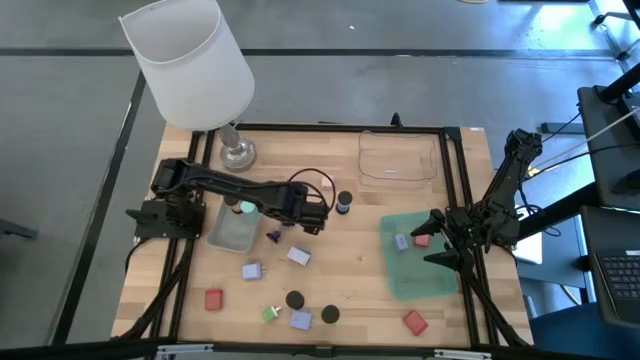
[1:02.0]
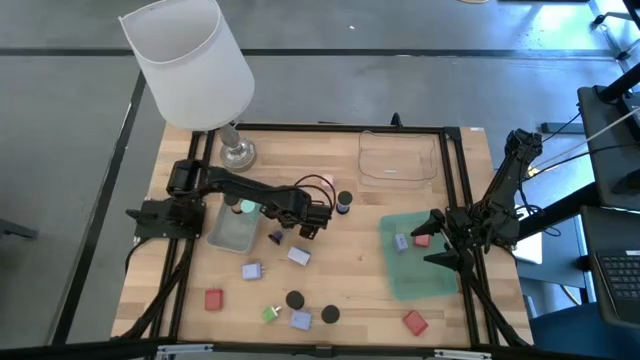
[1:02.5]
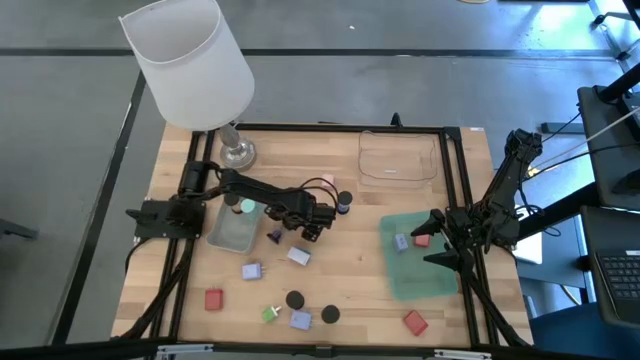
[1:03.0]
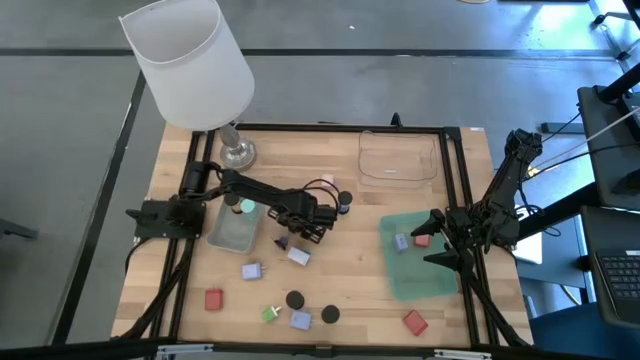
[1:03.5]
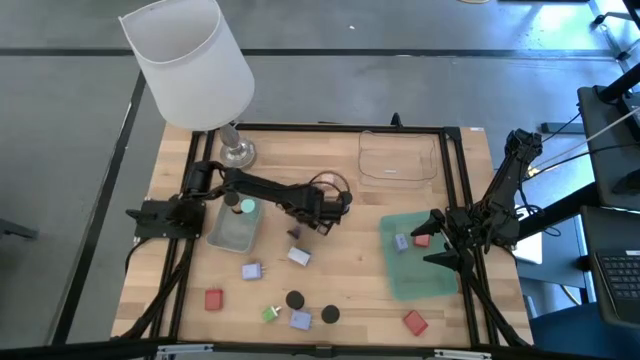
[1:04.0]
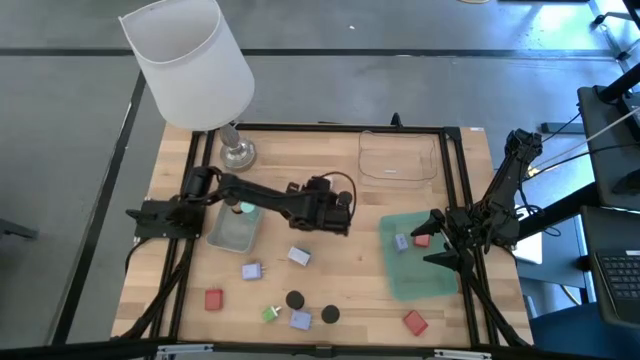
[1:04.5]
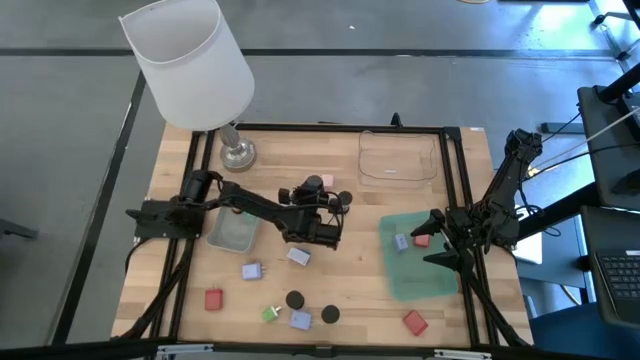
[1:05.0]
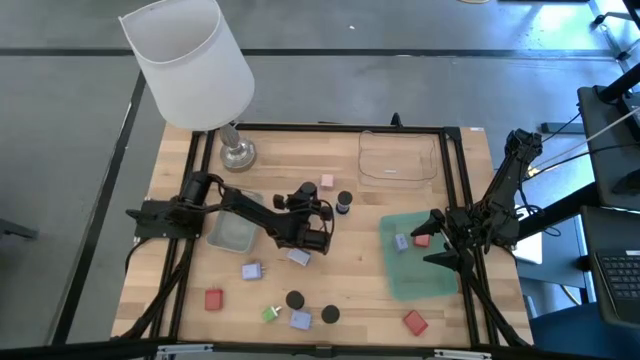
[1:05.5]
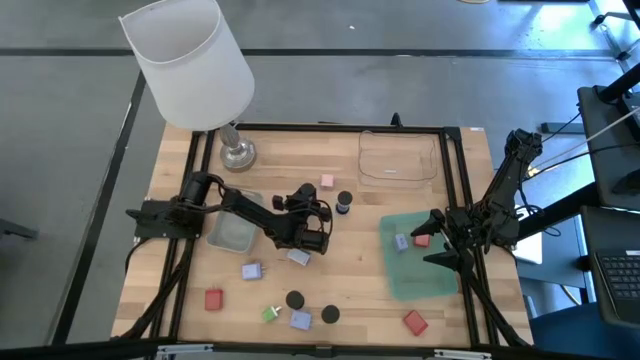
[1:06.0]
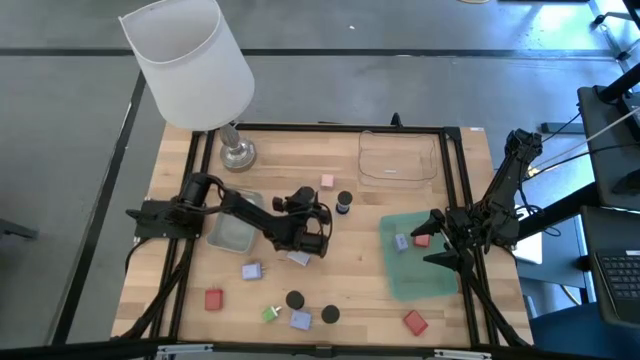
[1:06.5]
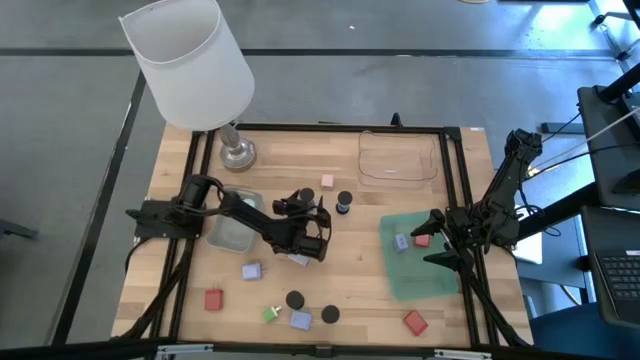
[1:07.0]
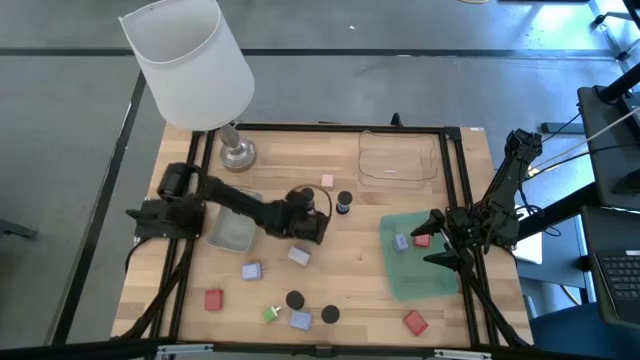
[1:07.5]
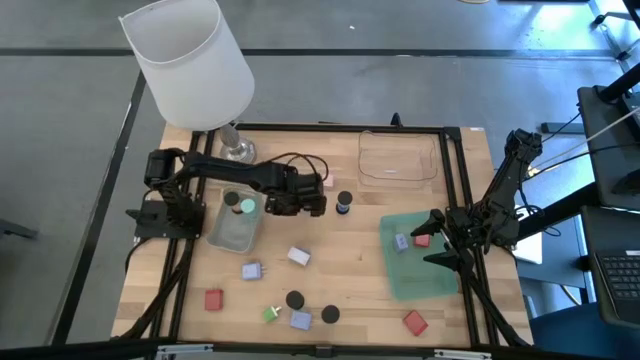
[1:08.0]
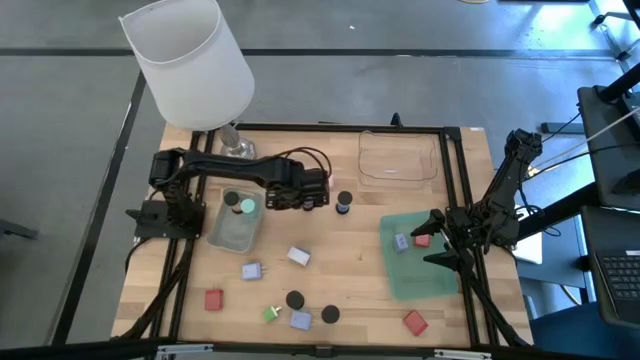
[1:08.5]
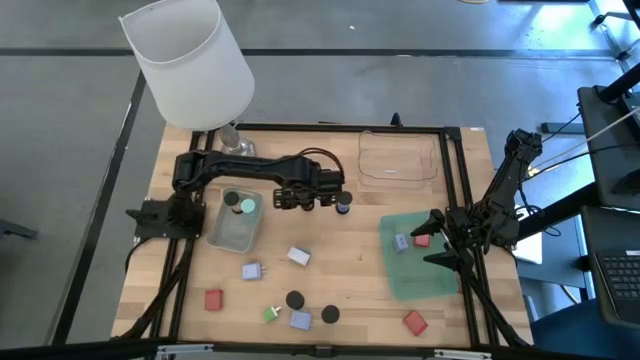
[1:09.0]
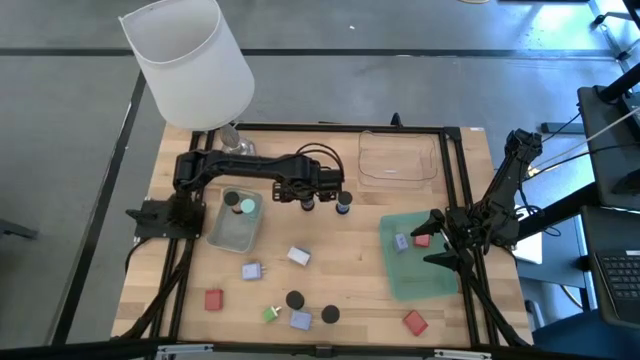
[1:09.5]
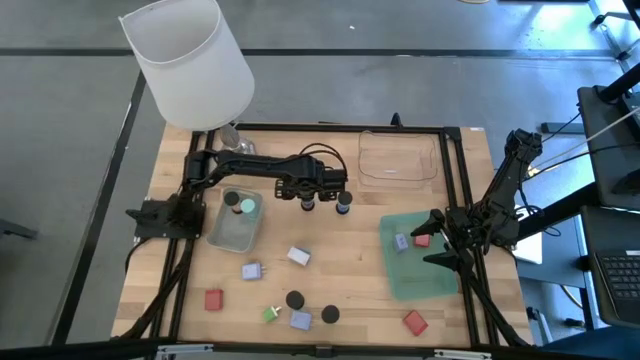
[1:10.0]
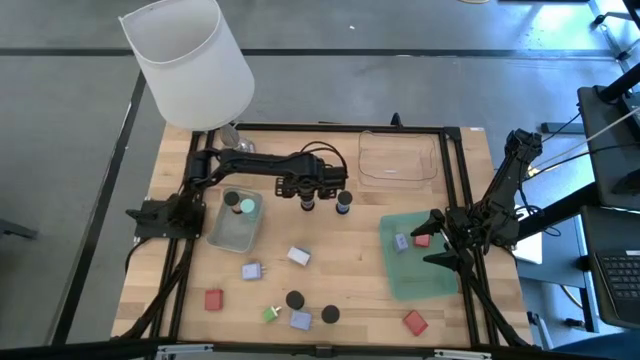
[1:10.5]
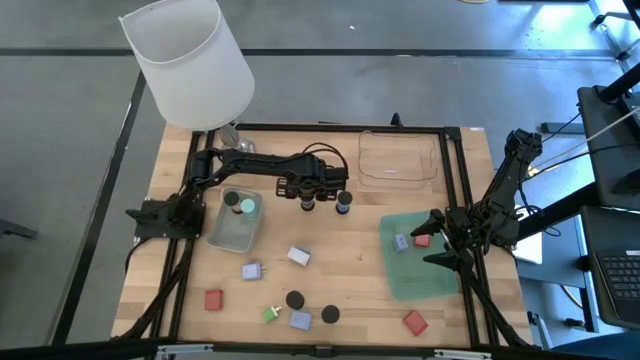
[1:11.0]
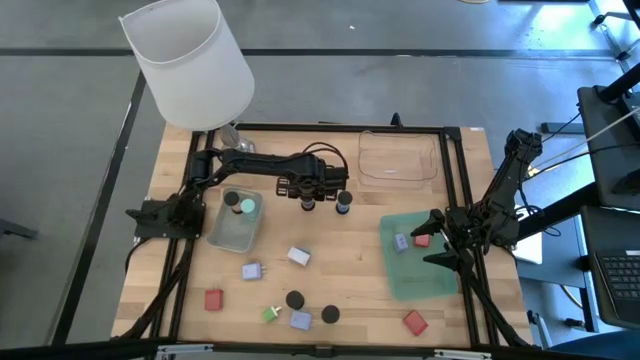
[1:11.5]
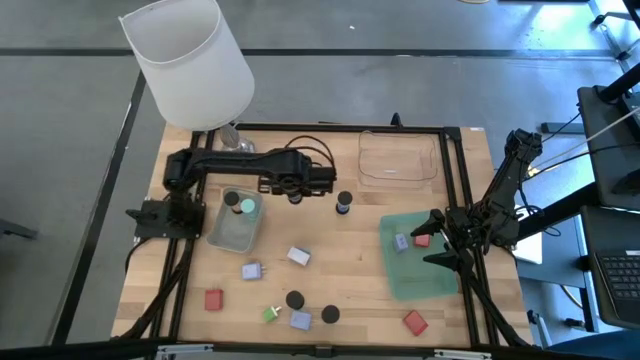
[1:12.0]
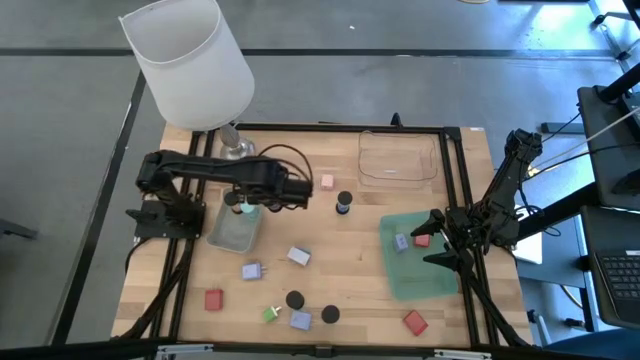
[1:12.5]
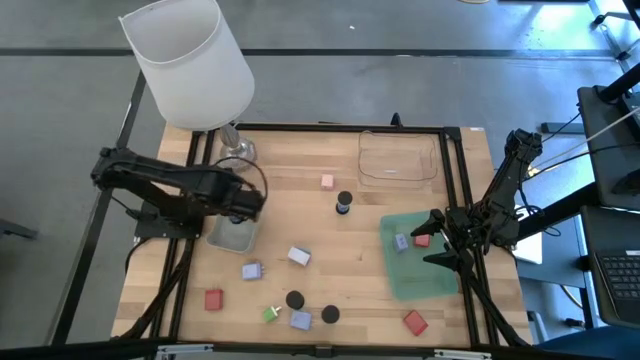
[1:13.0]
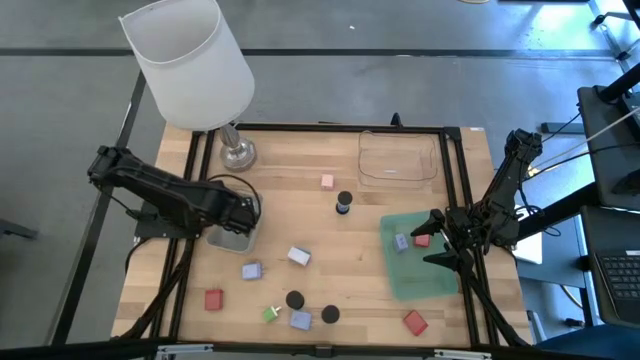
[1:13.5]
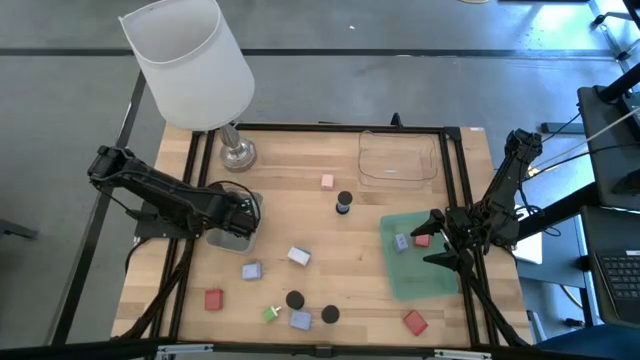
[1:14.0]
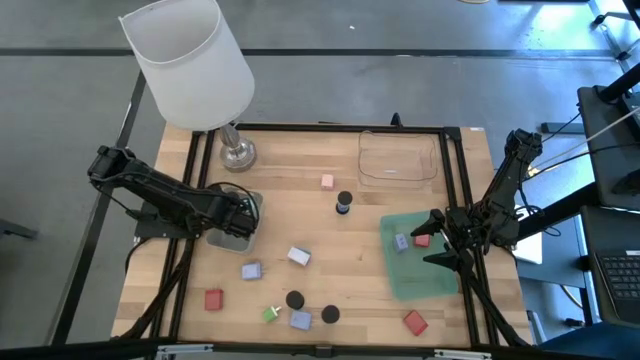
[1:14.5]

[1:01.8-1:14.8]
Task: Pick & Place Office items
Put the the bottom blue hourglass into the gray bin

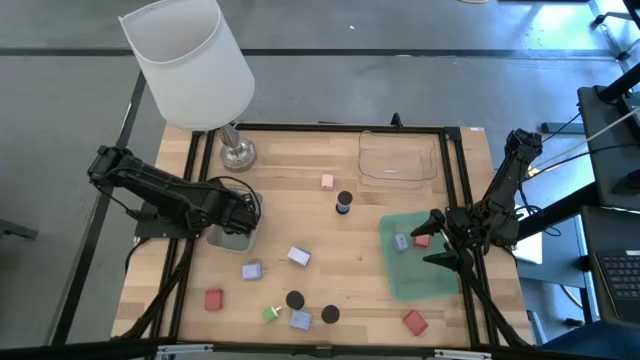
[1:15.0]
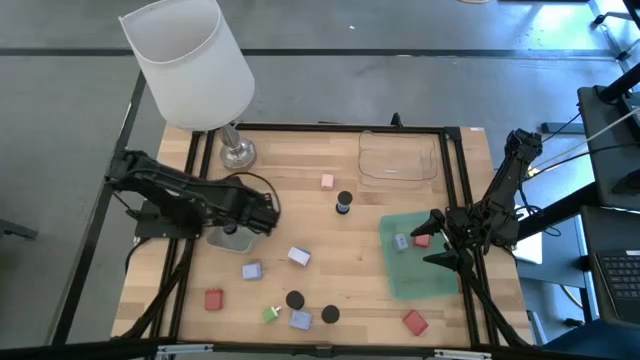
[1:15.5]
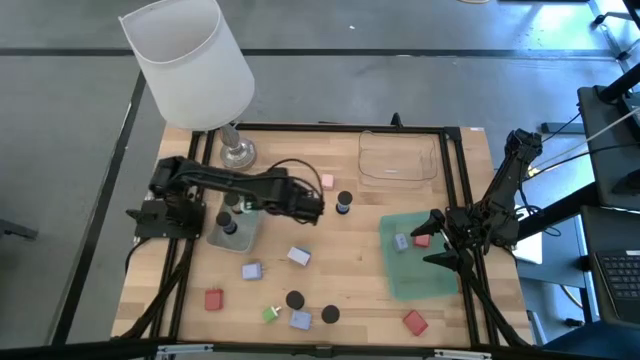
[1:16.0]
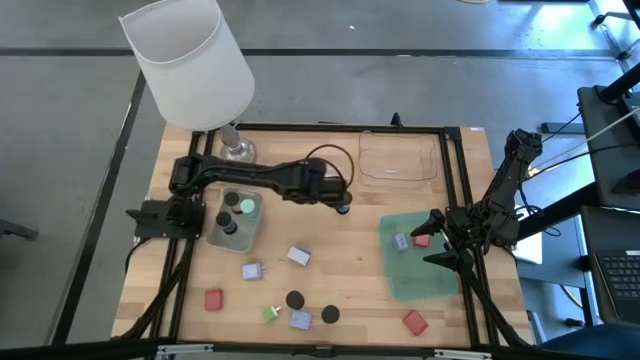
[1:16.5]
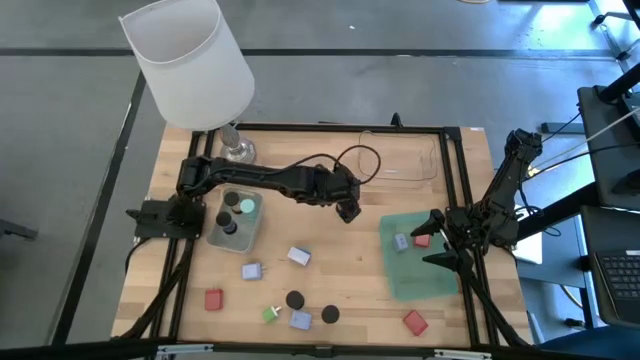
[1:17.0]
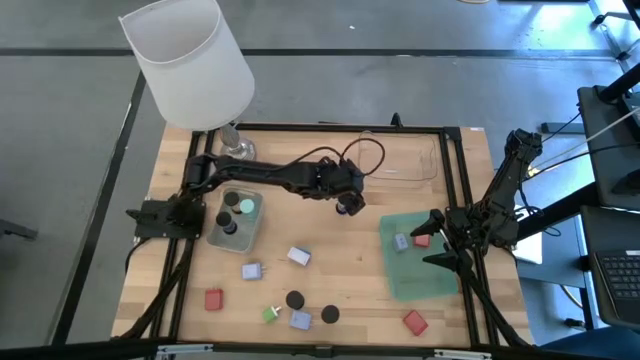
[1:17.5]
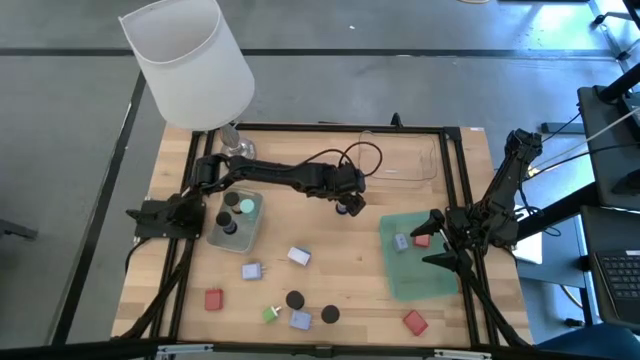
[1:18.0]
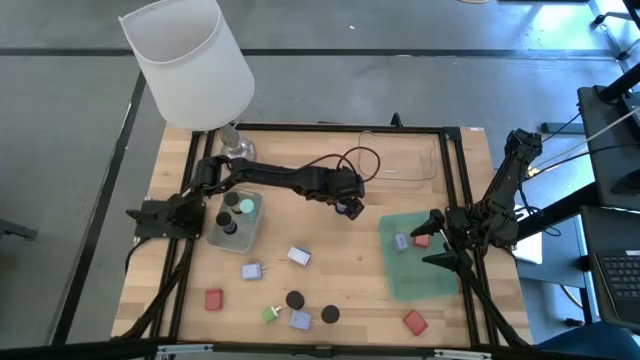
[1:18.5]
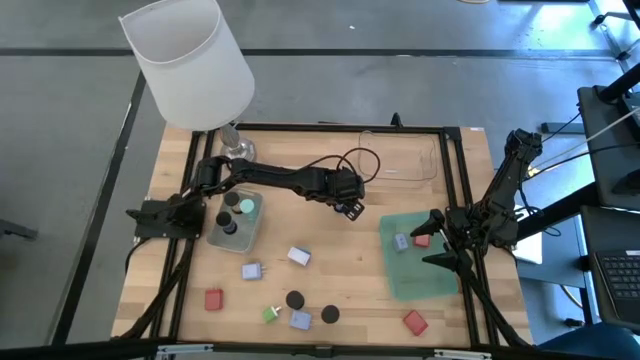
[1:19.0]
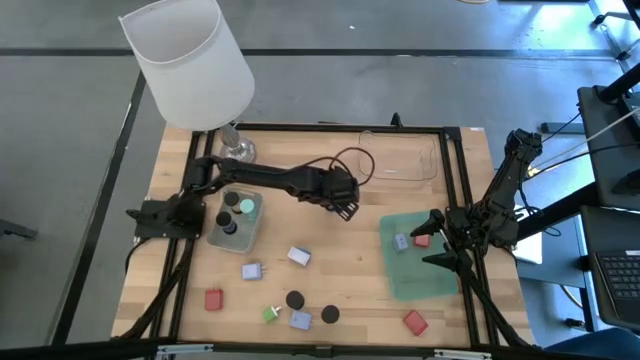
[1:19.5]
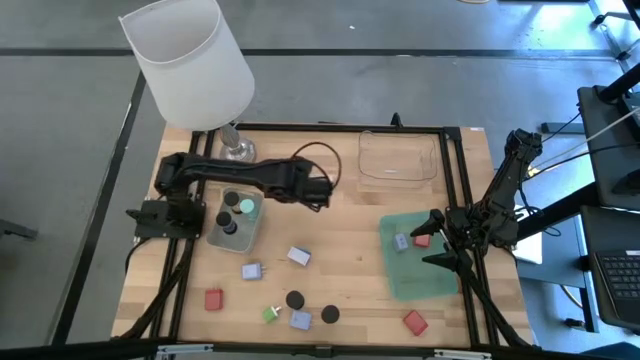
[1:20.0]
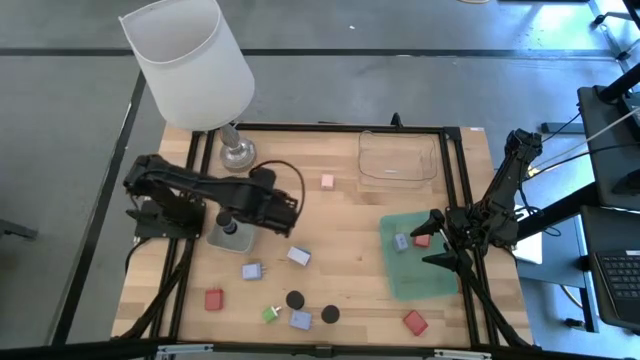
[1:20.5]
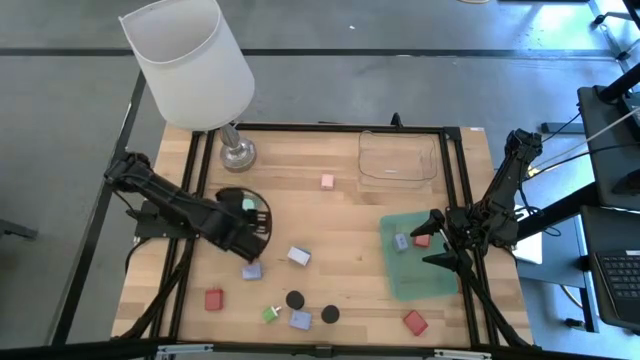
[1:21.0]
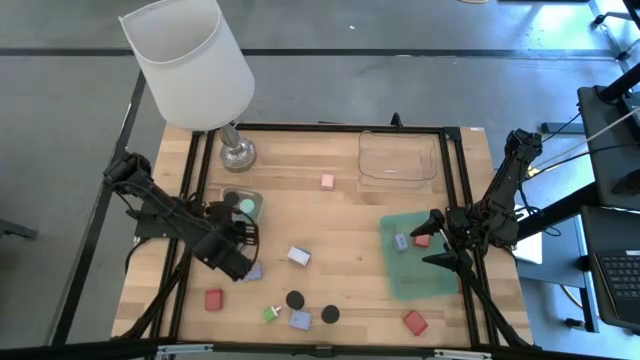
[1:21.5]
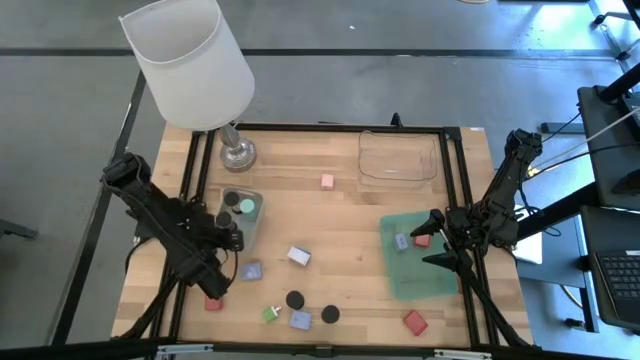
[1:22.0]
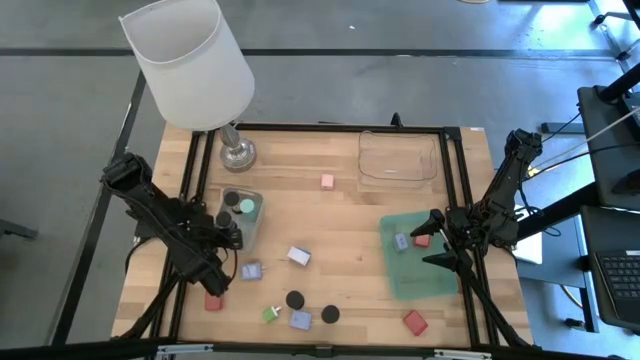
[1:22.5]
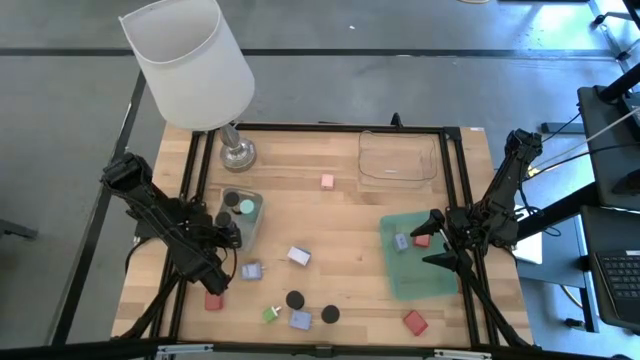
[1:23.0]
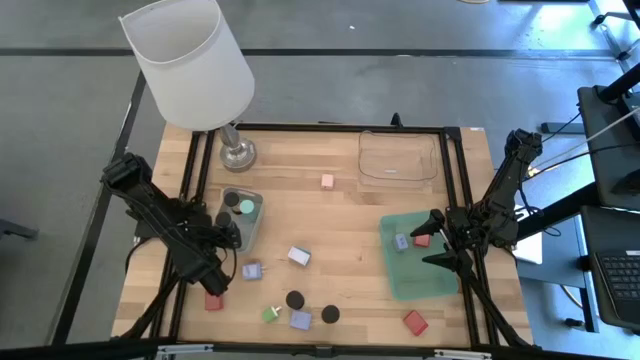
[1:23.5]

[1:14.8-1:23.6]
Put the blue hourglass into the gray bin
